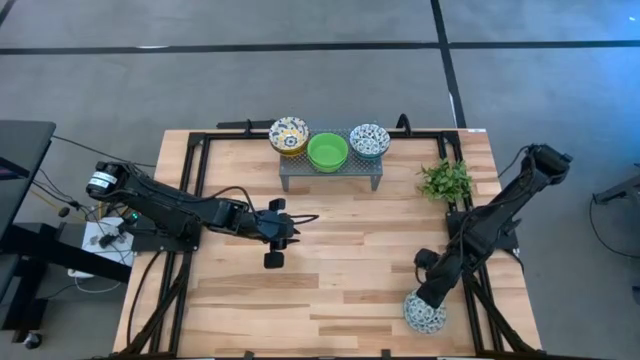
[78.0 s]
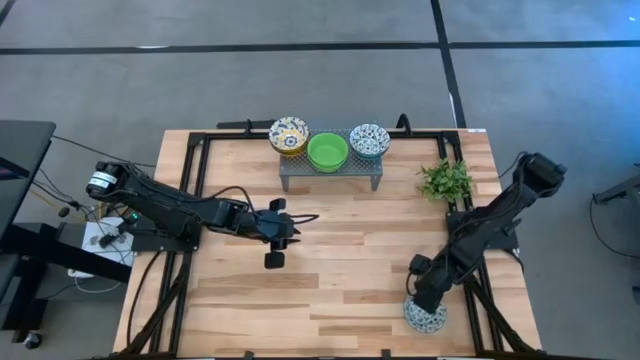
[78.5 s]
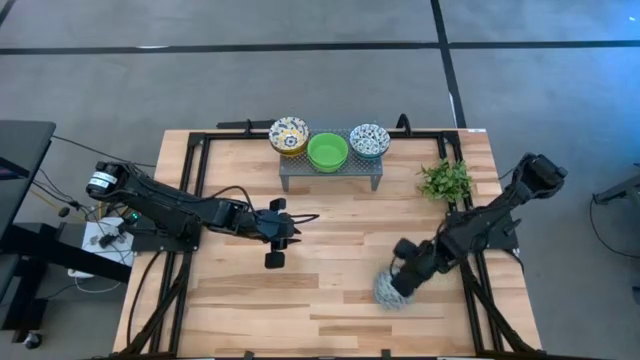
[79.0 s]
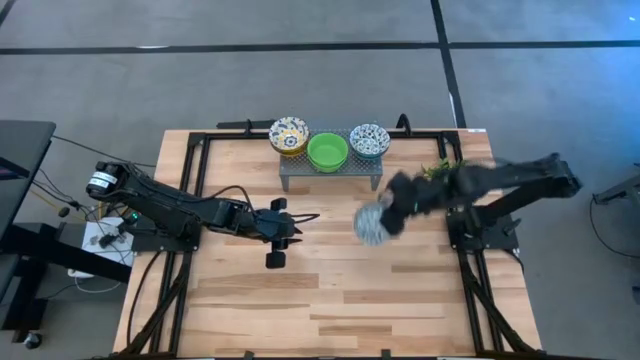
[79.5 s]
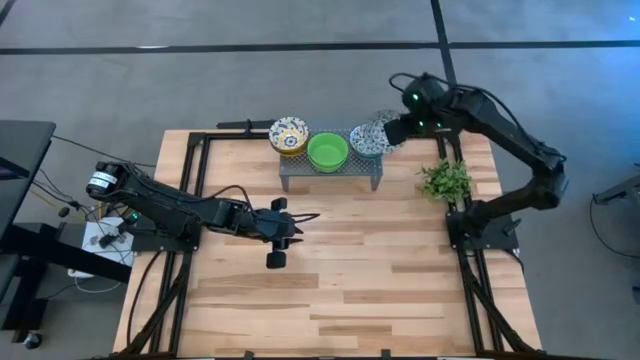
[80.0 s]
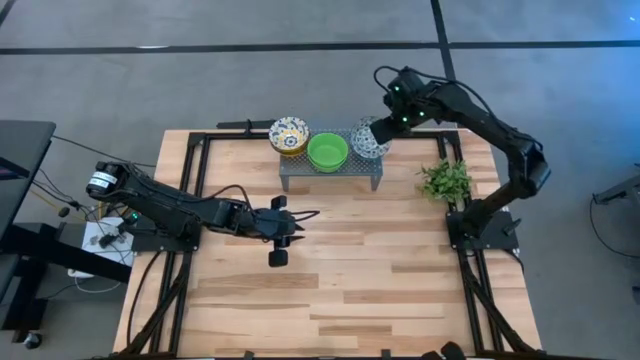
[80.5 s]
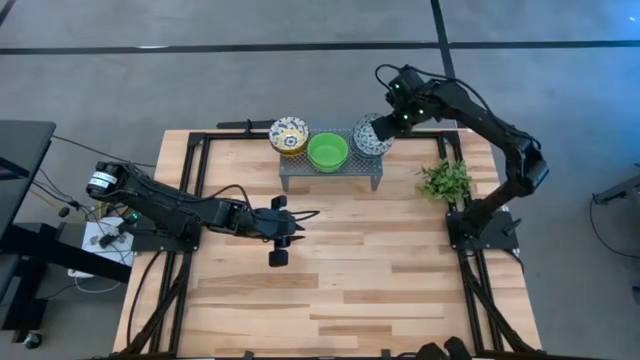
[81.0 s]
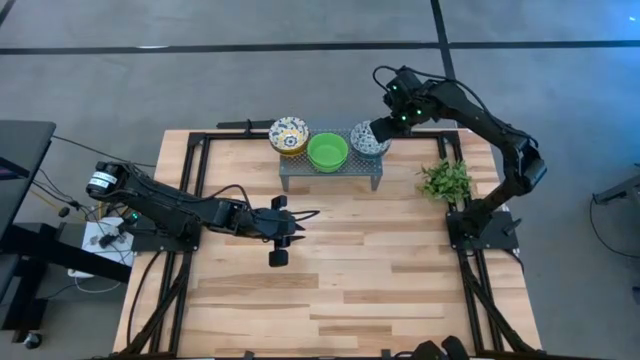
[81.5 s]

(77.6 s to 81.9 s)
Task: Pick & Place Mini bowls
Stack the green patterned bowl on top of the green patterned bowls on the shelf

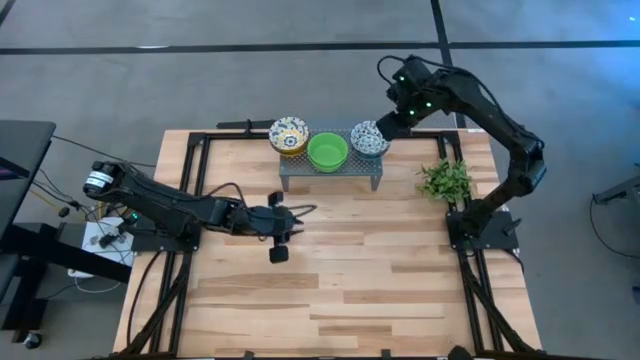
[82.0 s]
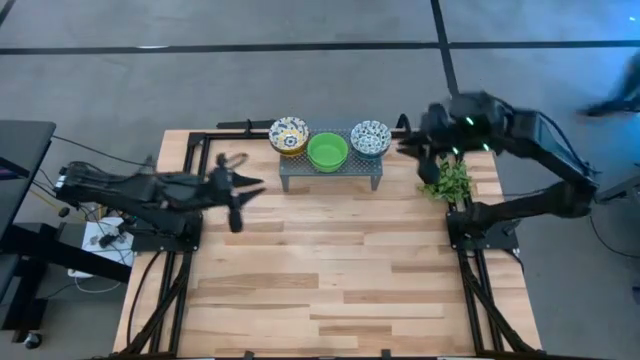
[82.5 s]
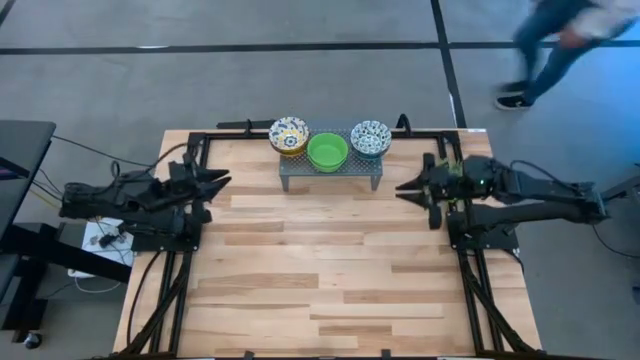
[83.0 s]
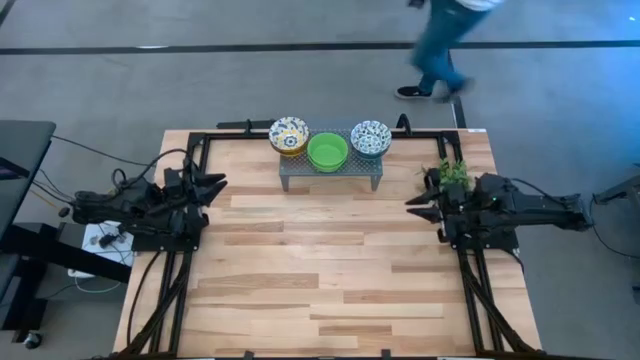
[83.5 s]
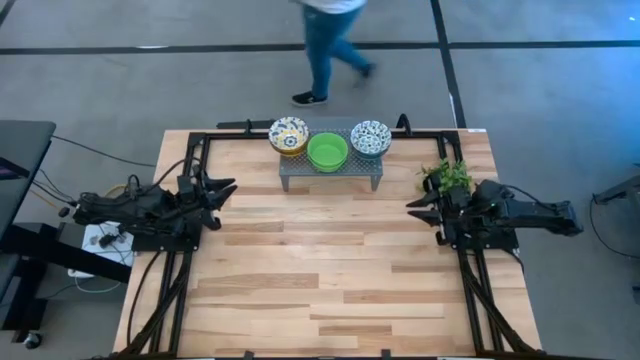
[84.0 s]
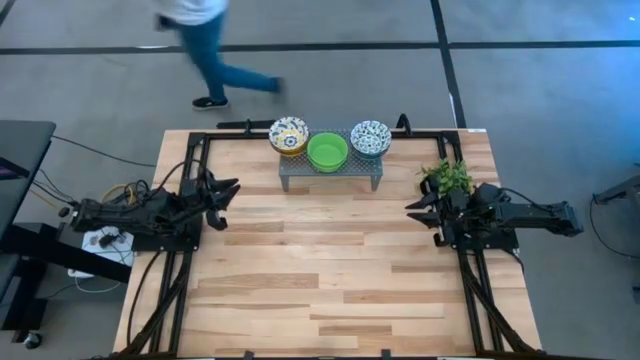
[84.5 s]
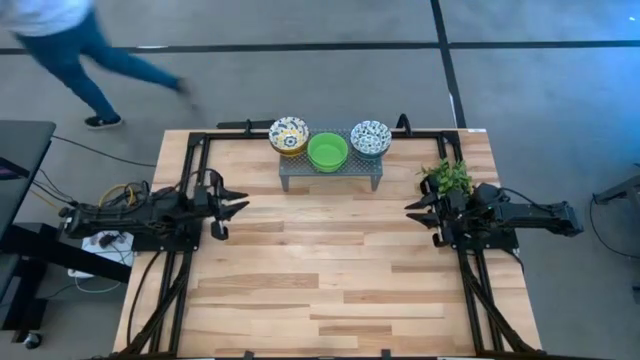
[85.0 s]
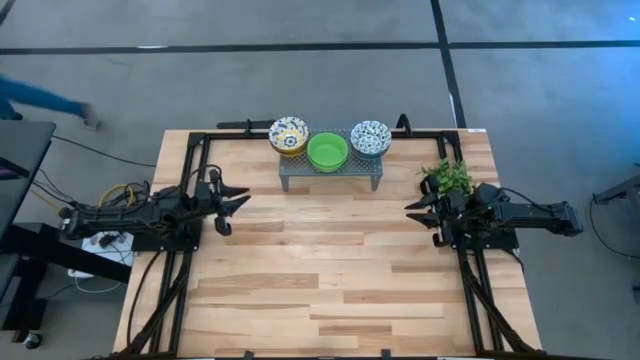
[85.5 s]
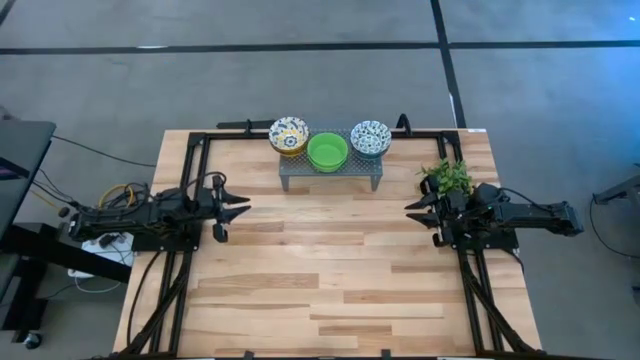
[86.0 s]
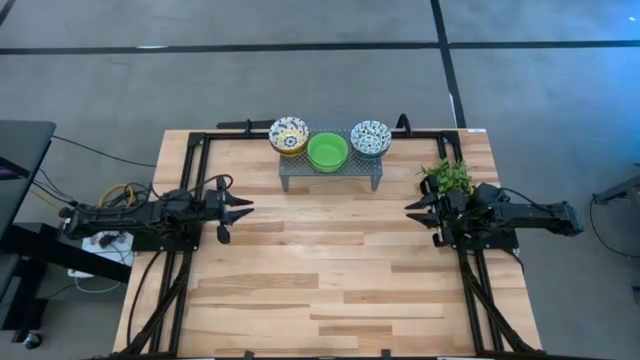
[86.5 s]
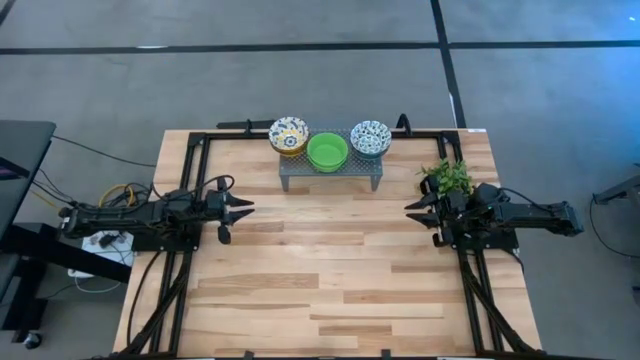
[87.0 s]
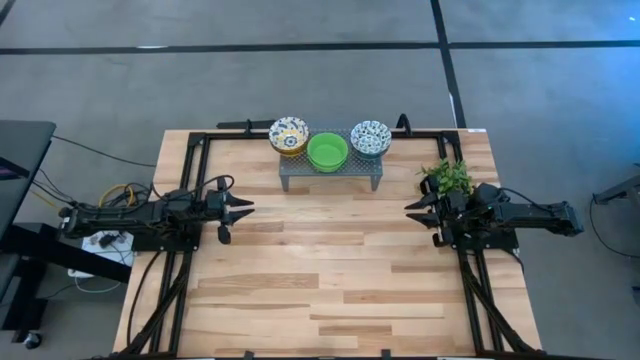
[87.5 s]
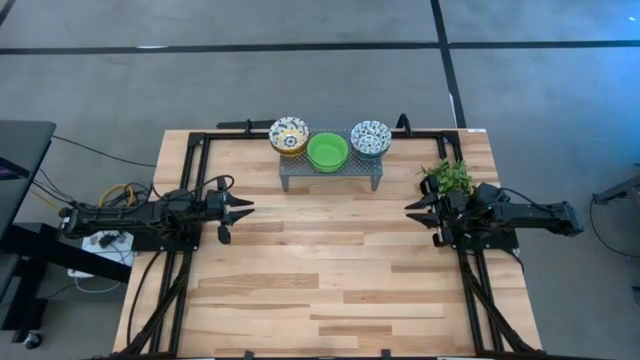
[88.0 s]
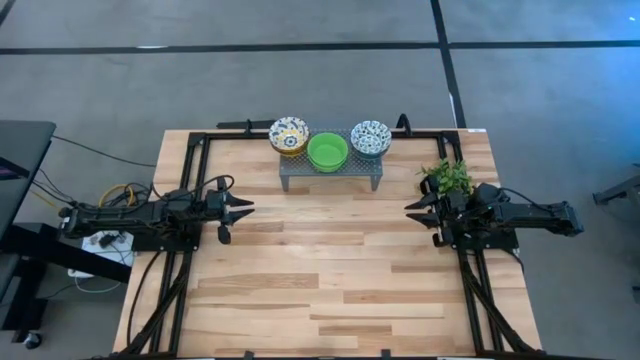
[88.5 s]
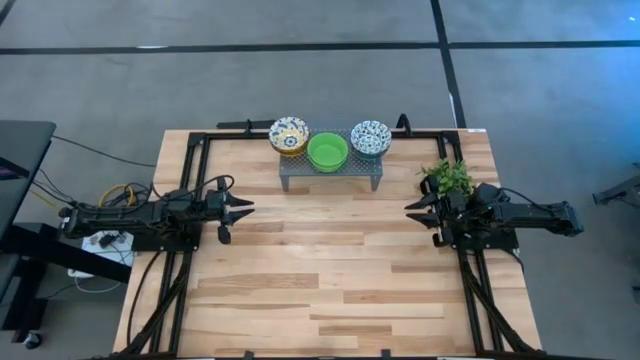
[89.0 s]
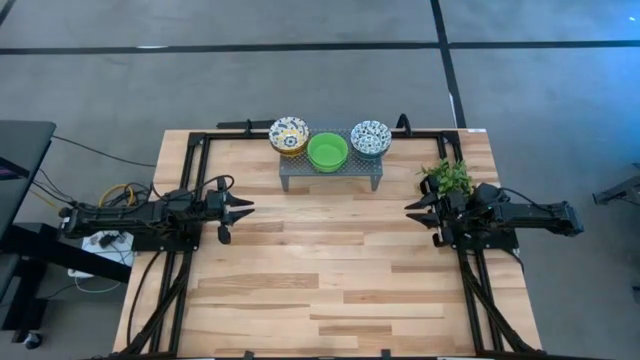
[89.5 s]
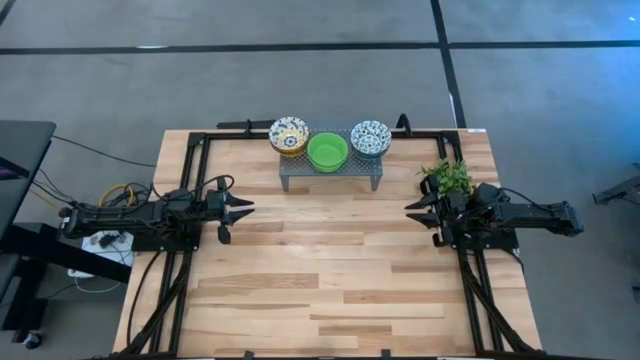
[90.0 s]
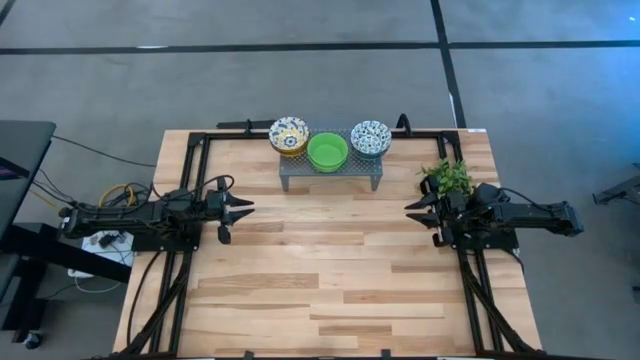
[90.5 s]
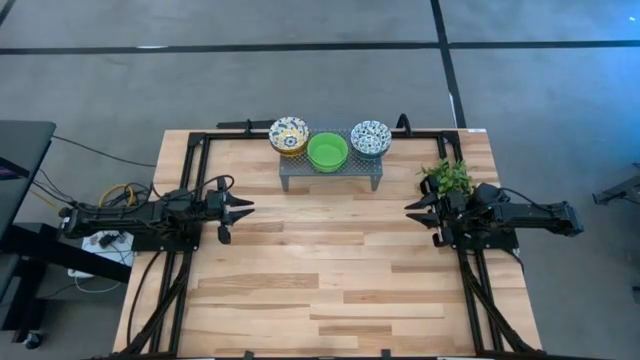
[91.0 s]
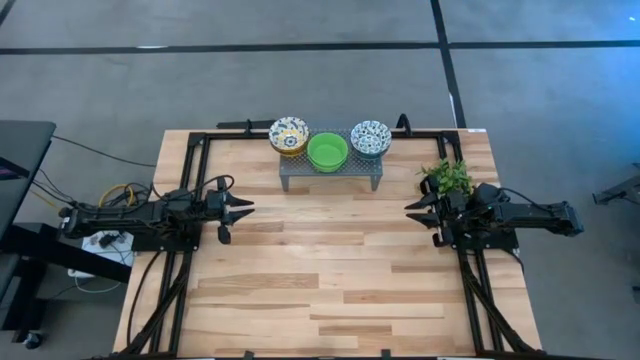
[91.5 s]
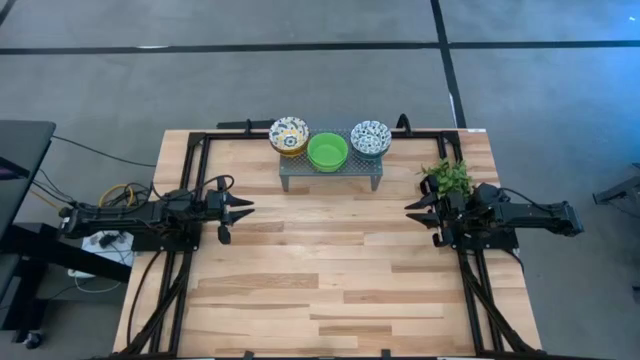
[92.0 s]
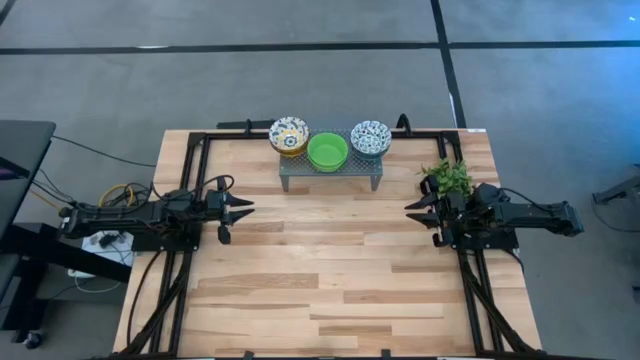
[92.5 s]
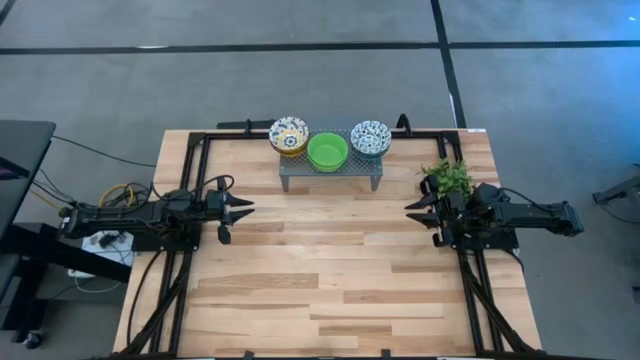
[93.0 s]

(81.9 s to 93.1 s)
Return to Home Position

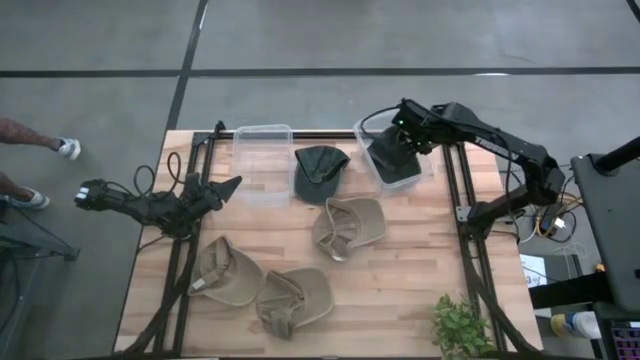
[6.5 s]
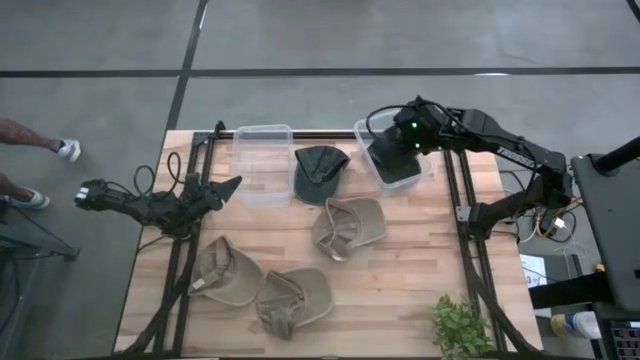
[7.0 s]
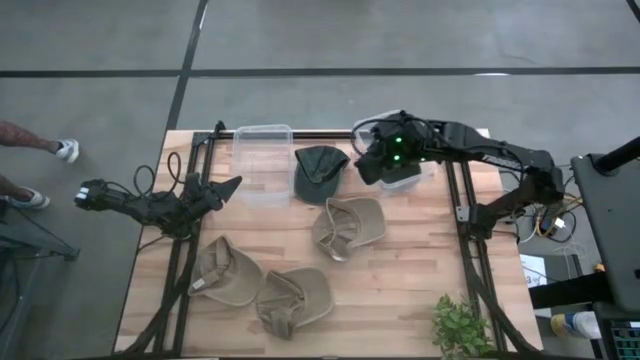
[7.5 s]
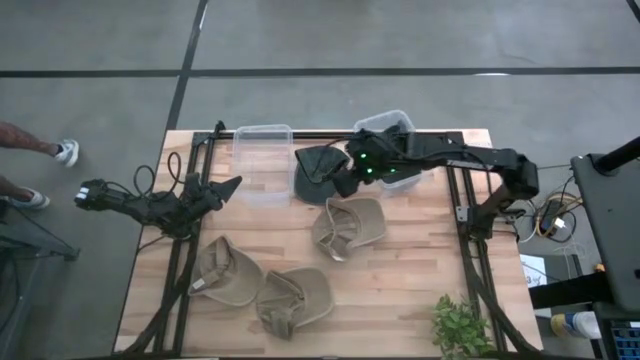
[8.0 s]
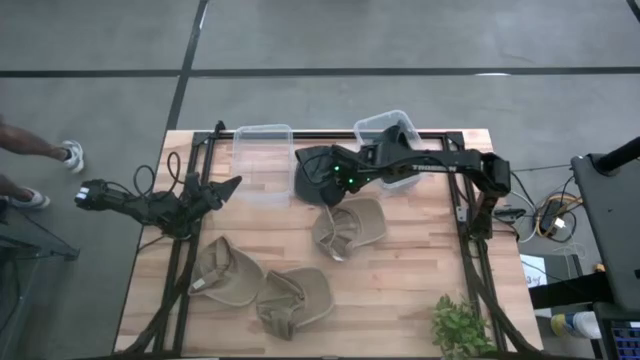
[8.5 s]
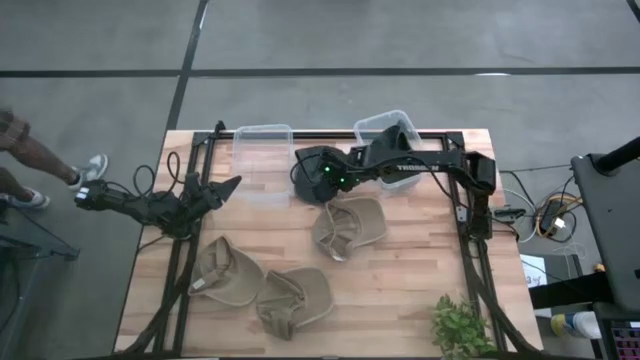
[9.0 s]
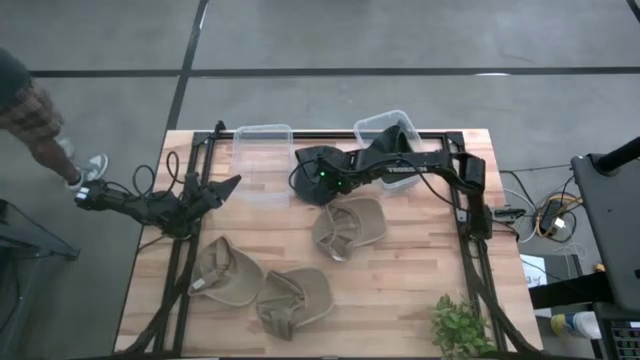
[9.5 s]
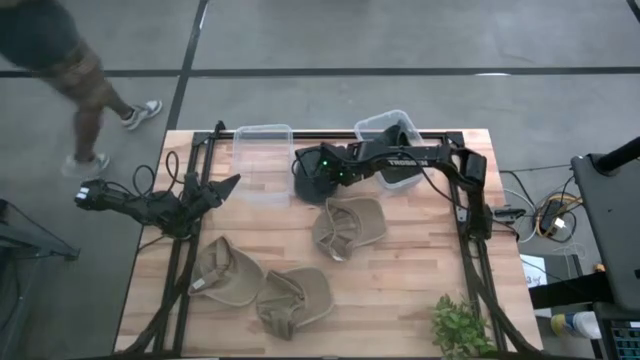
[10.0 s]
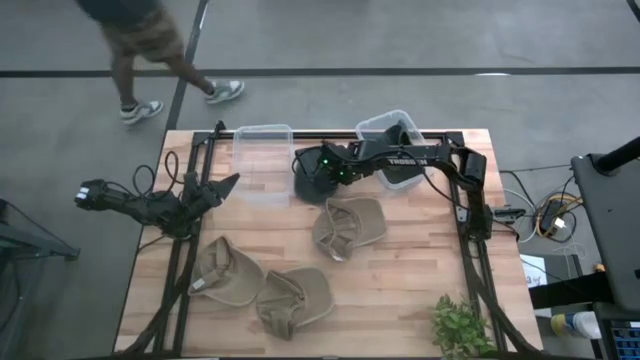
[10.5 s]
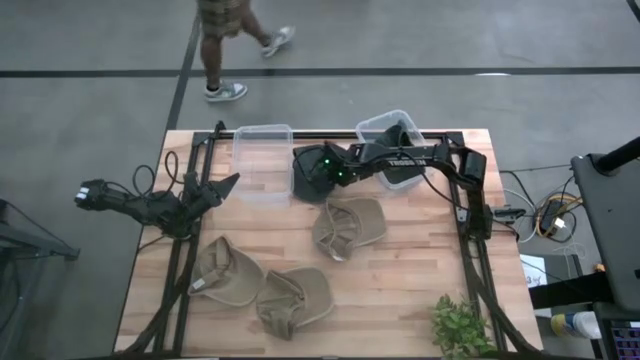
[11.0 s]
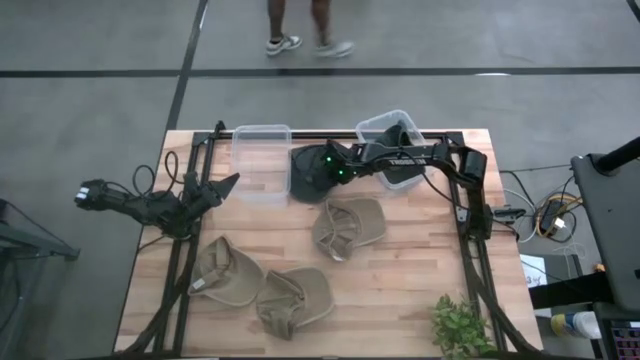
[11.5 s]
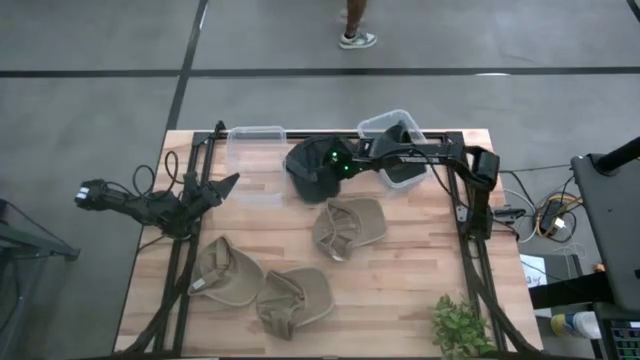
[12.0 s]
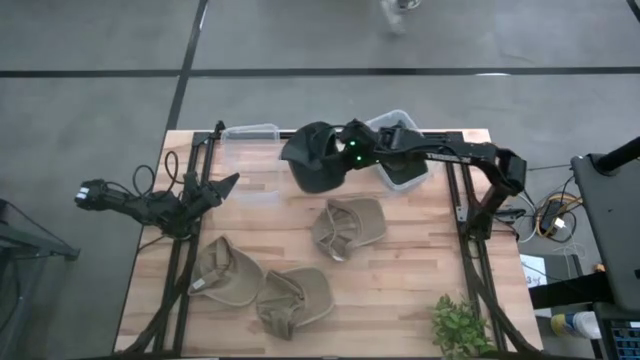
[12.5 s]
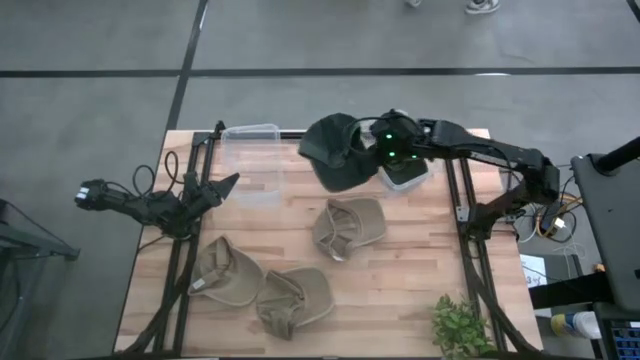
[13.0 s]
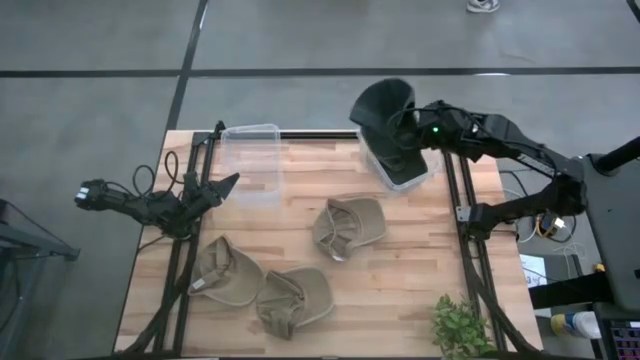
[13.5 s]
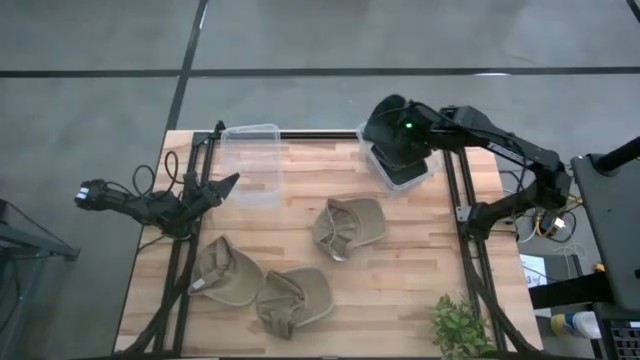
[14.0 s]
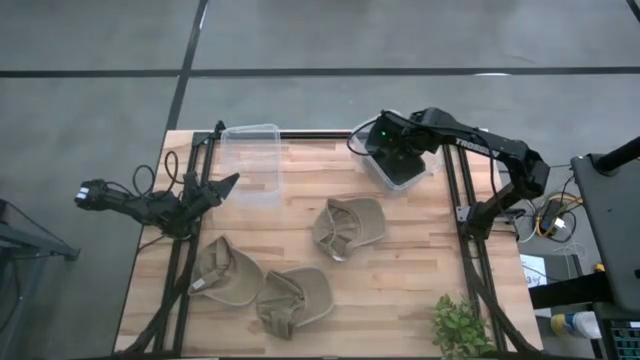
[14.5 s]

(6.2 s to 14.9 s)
Task: Pick & Place hat
Put the black cap into the right transparent bin
